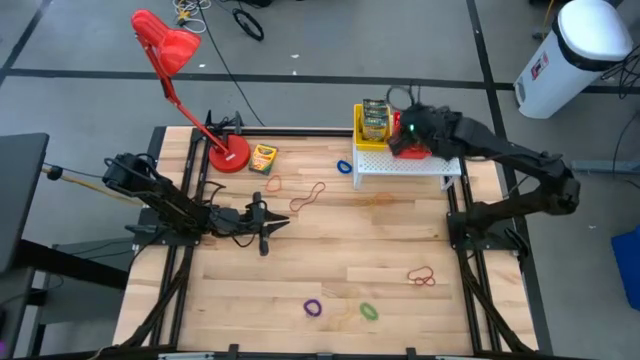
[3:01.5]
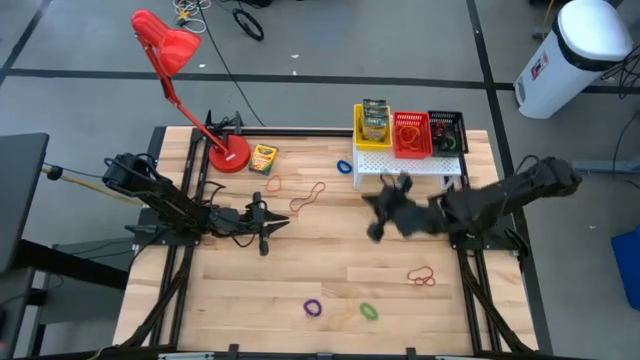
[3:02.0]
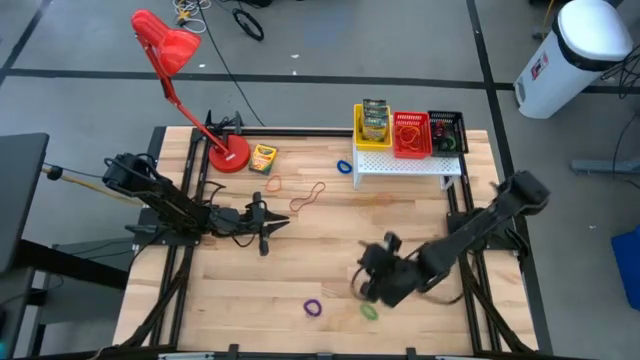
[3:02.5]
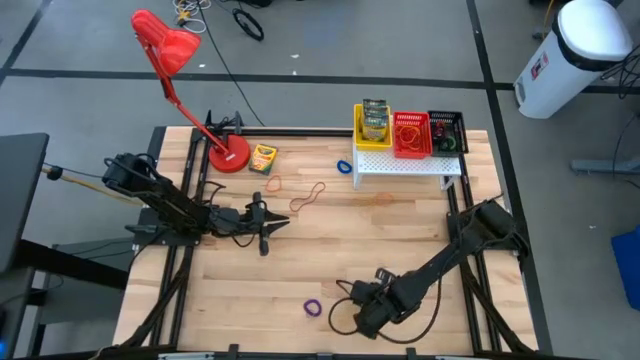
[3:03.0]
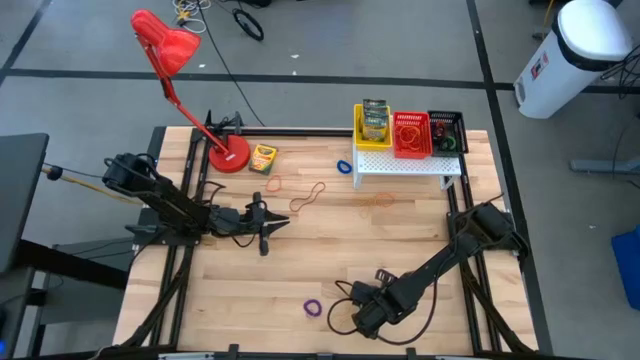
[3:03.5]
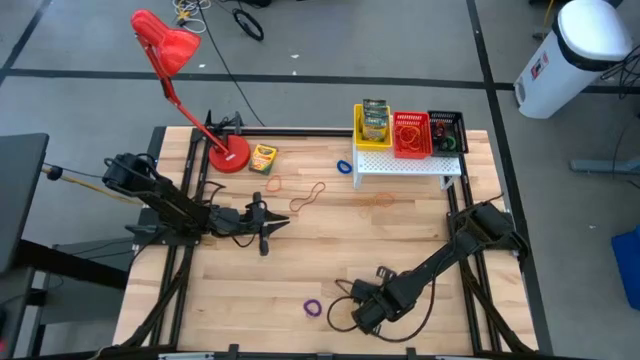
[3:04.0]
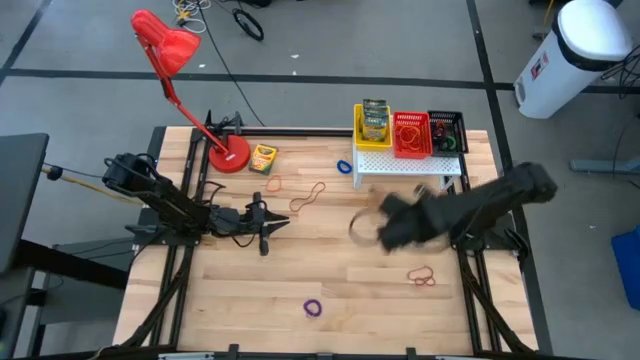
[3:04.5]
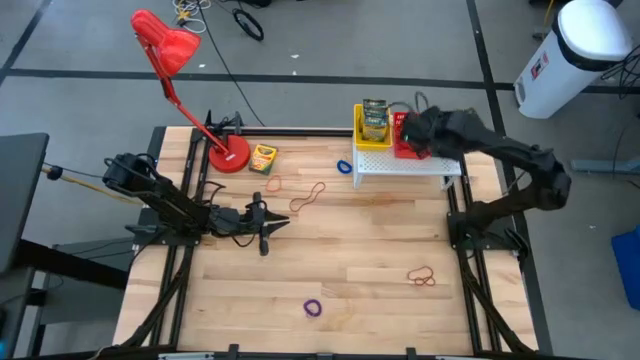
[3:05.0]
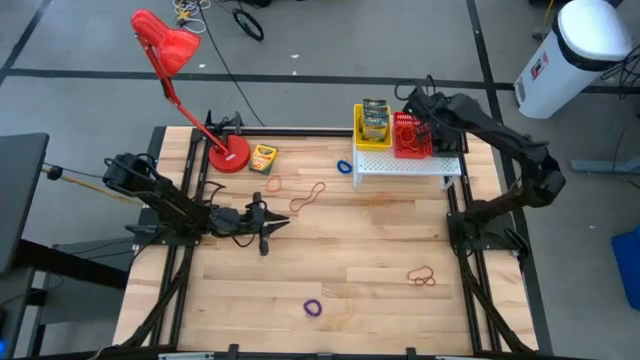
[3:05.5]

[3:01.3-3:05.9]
Task: Pick & Place Office Desk Supplies
Put the green spring keychain on the black basket

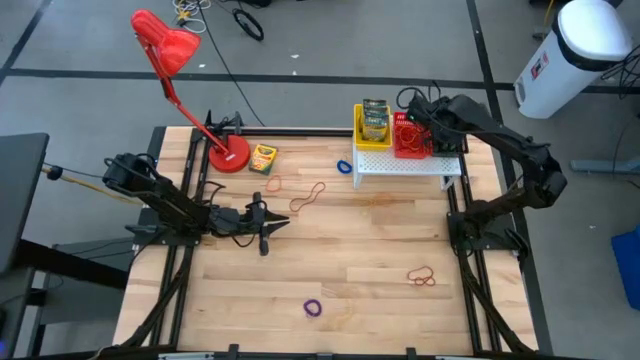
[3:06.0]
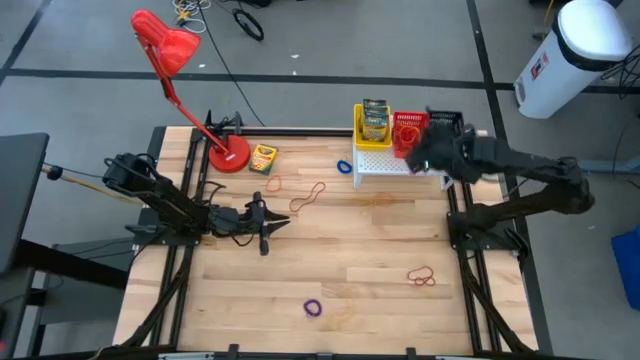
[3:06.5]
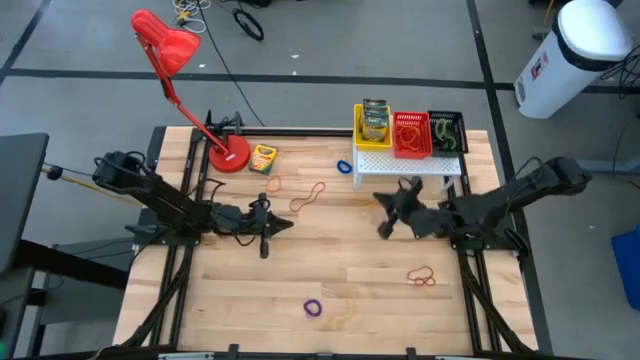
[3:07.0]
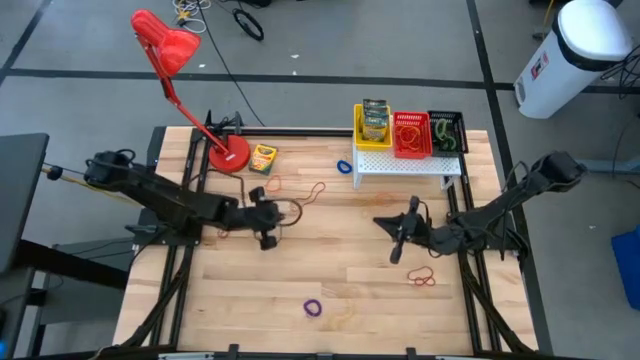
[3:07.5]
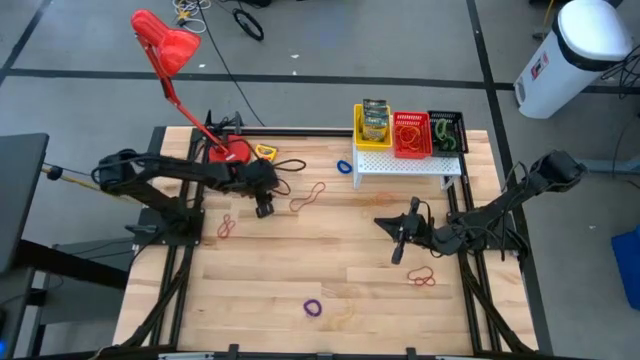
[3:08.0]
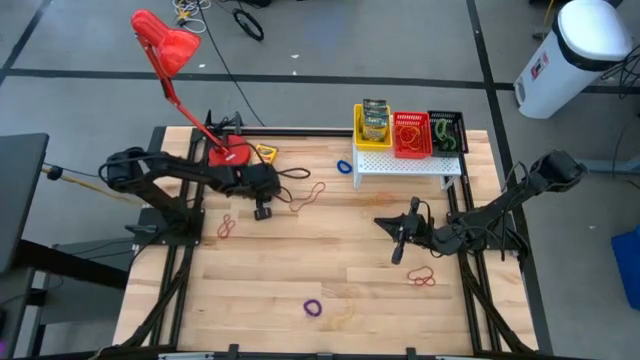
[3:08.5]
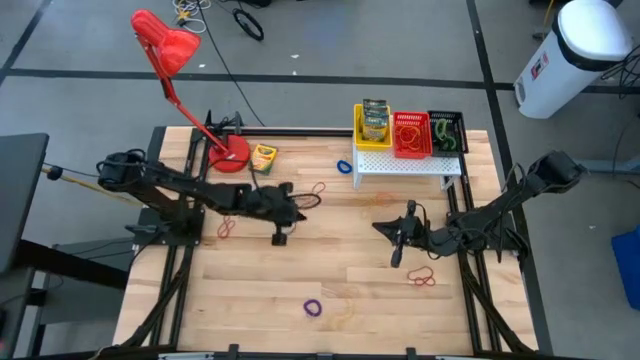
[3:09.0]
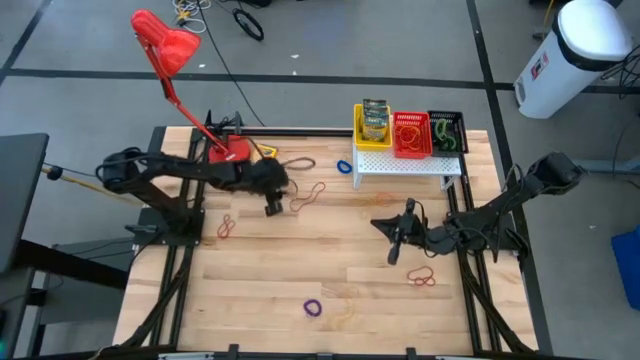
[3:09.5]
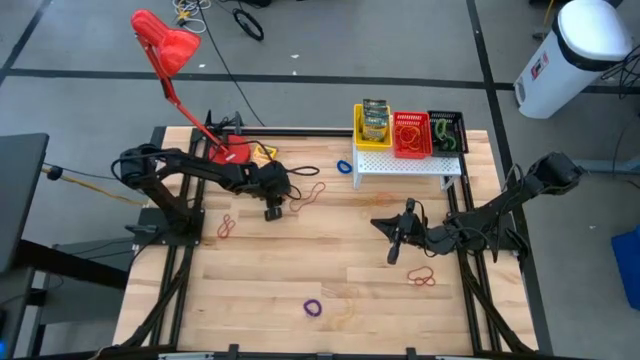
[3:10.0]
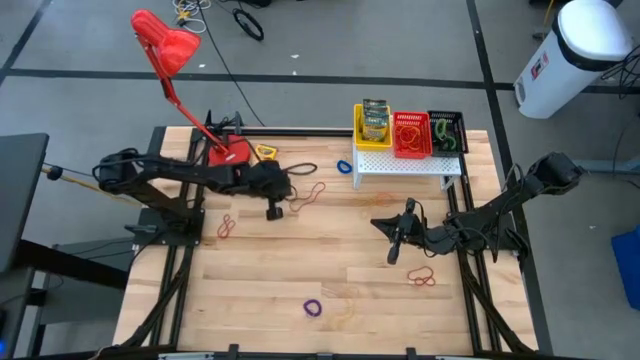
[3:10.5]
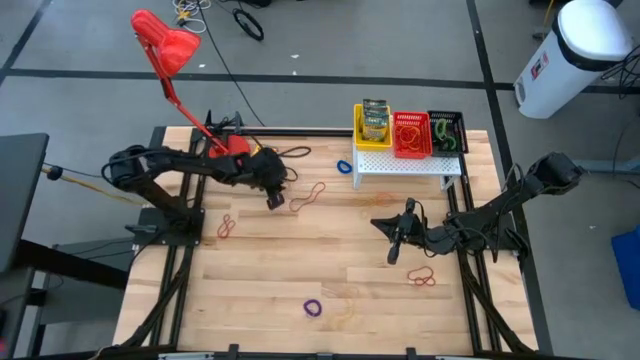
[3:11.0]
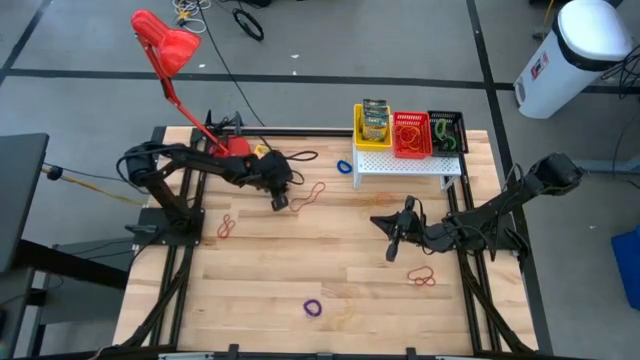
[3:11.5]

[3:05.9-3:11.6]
Put the orange rubber band on the red basket

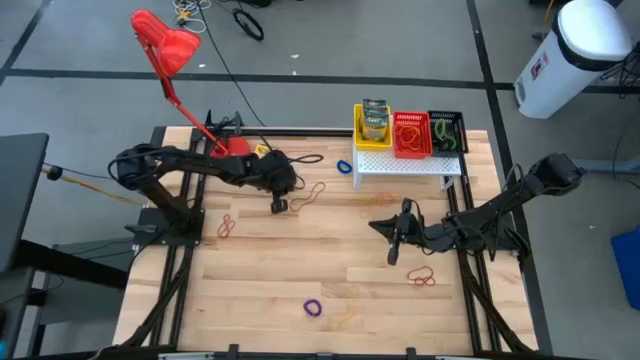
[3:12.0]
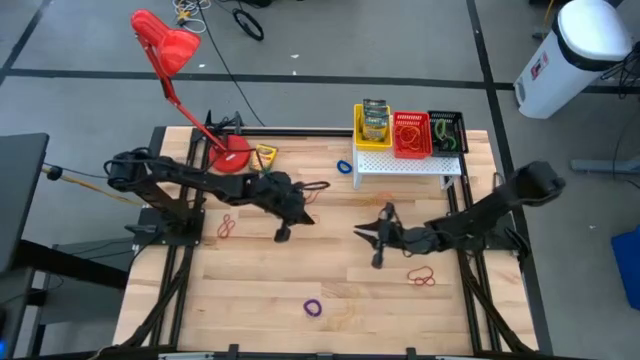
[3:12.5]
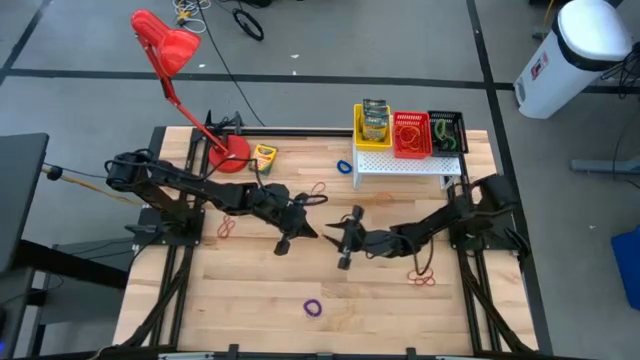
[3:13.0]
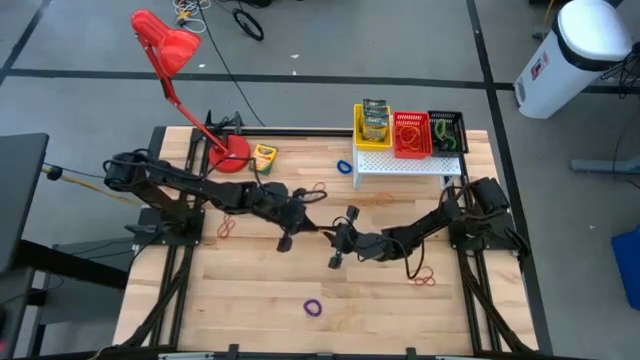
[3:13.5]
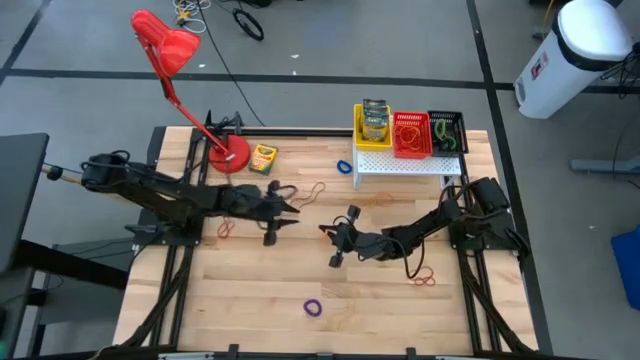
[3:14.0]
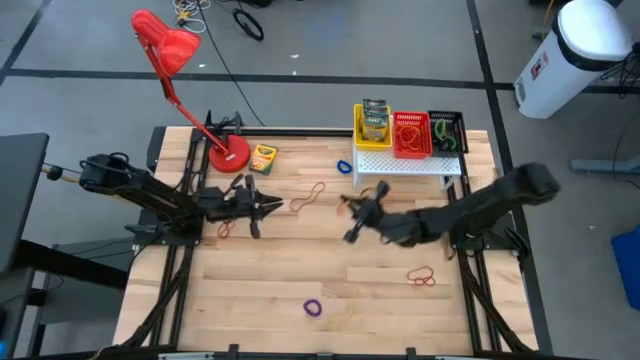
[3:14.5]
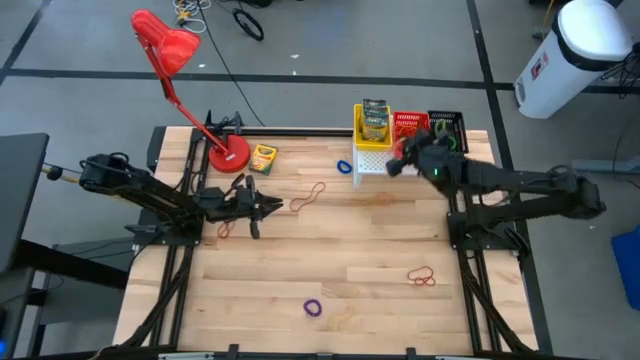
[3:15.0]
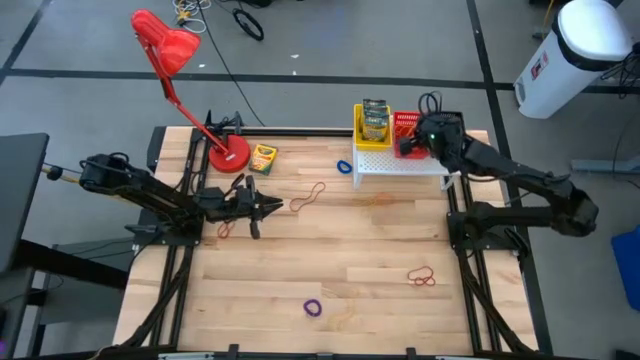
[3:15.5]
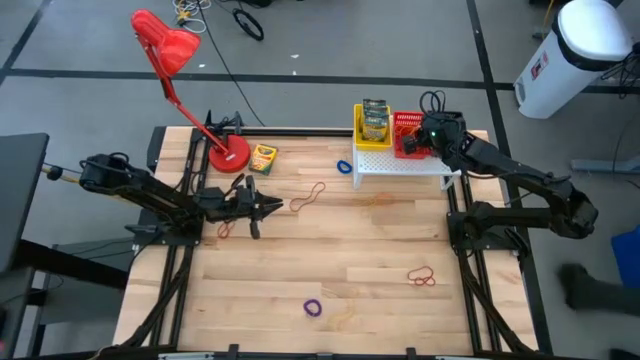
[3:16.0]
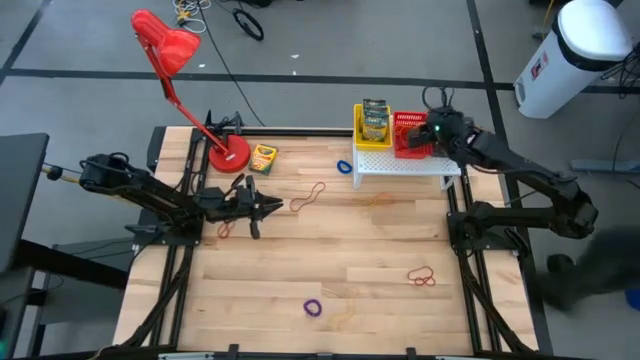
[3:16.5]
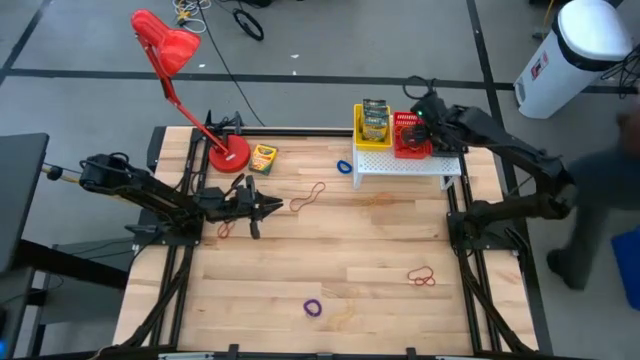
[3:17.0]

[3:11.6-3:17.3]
Put the orange rubber band on the red basket

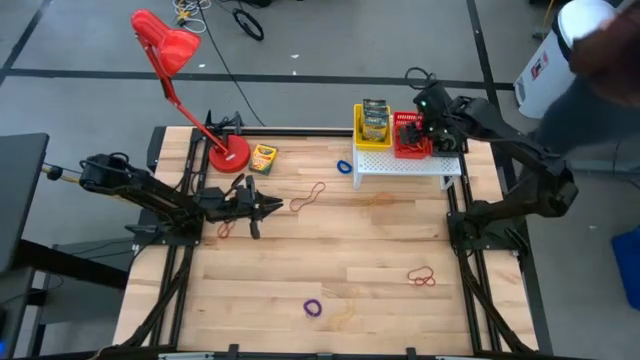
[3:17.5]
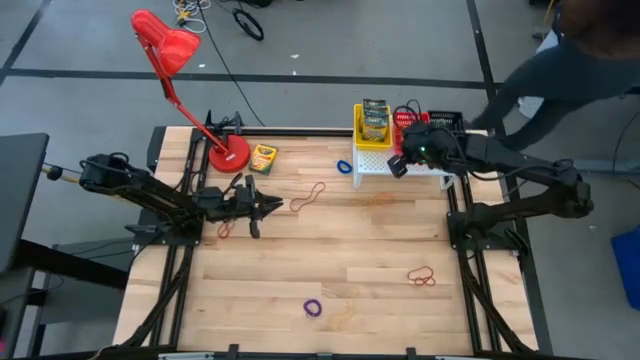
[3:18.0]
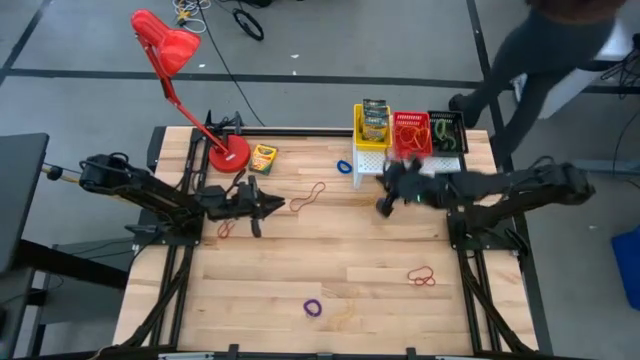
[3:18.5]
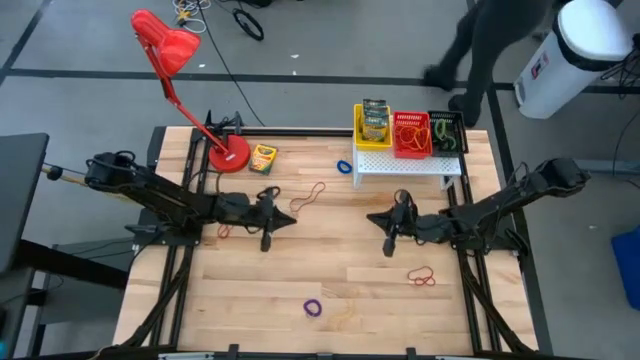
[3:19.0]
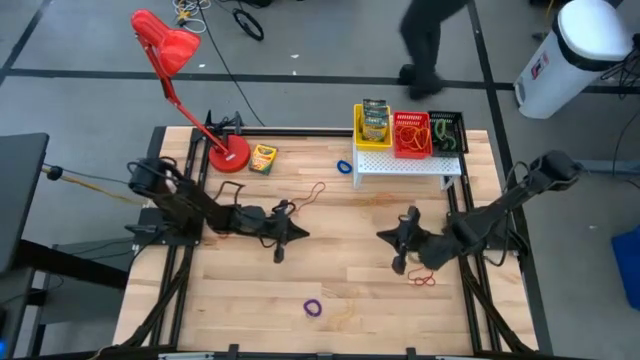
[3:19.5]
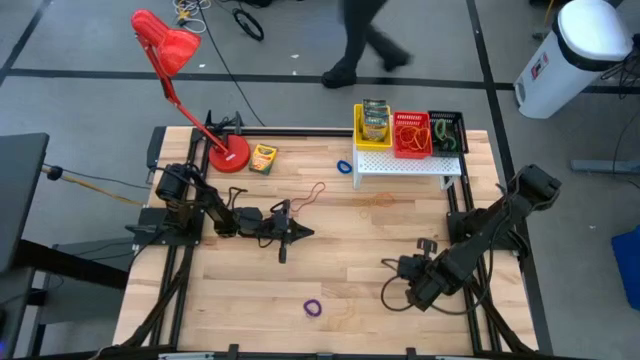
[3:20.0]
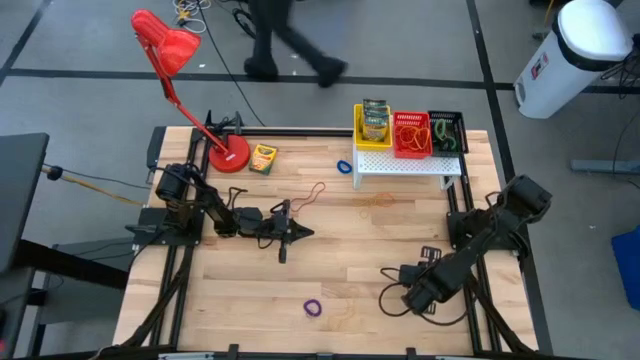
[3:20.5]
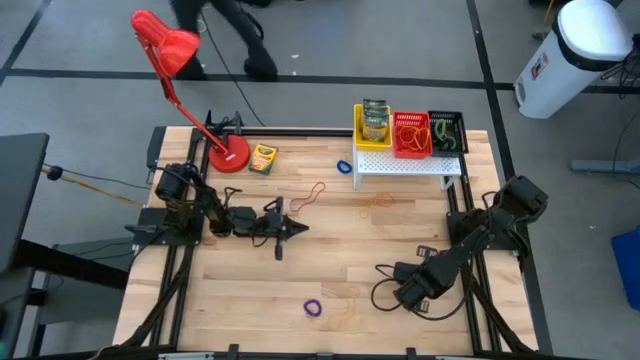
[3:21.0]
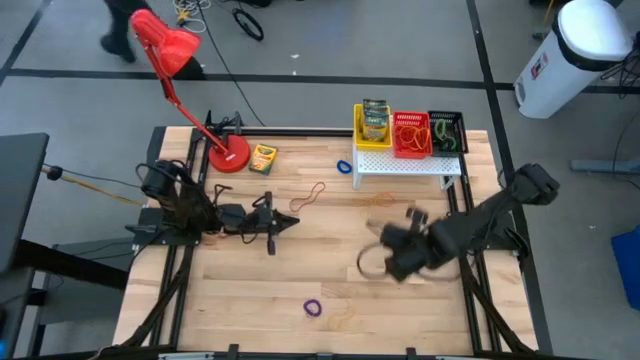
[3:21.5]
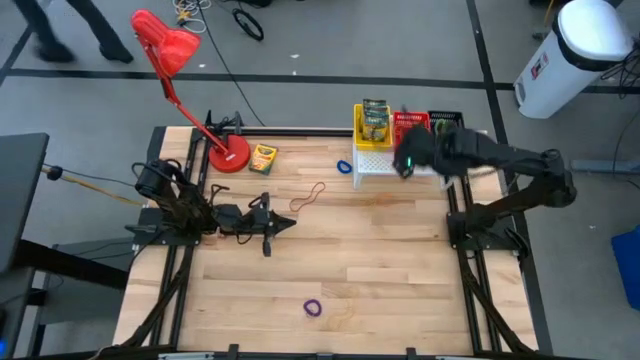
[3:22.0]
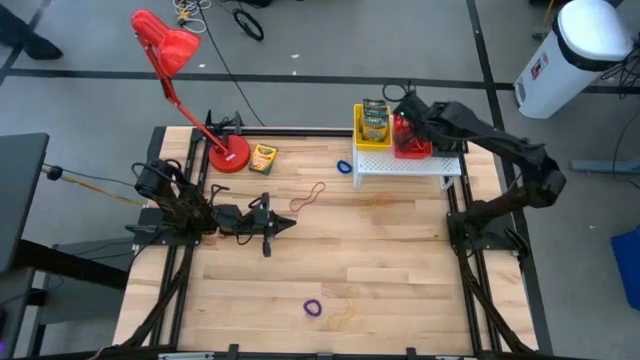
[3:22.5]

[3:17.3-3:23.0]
Put the red rubber band on the red basket
